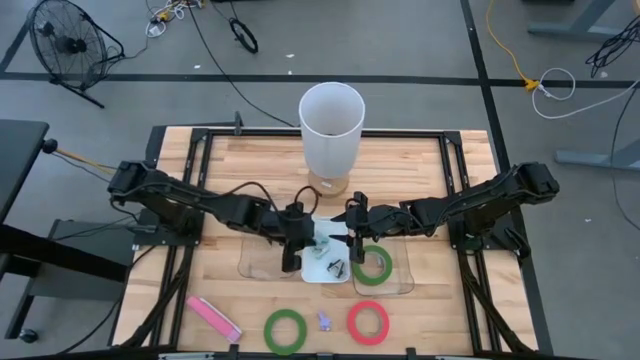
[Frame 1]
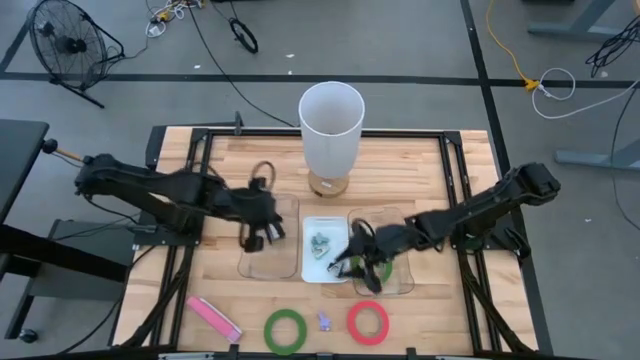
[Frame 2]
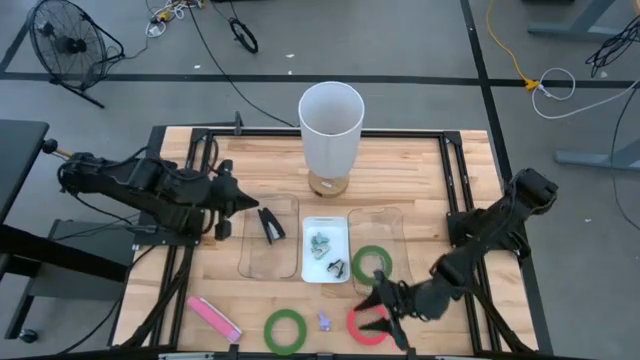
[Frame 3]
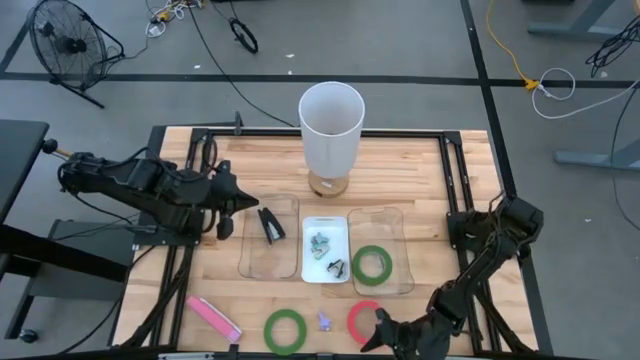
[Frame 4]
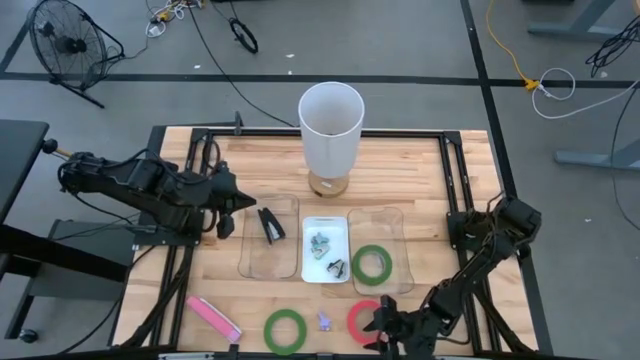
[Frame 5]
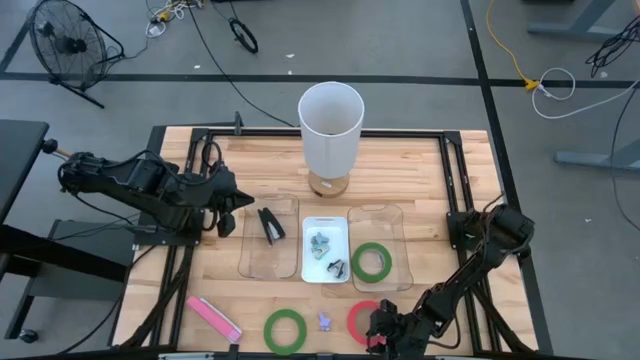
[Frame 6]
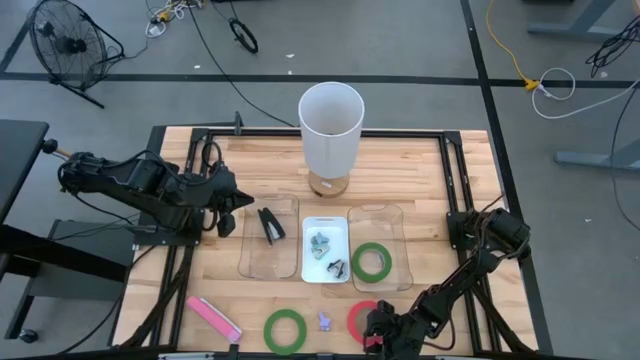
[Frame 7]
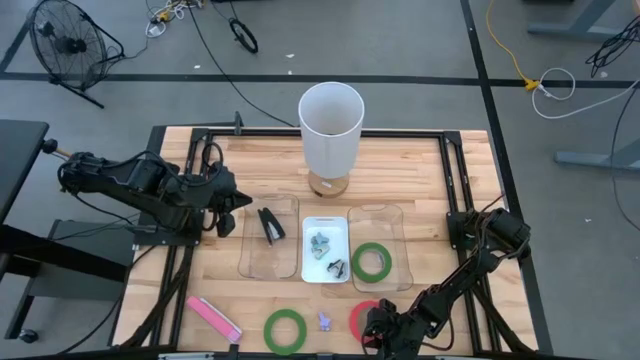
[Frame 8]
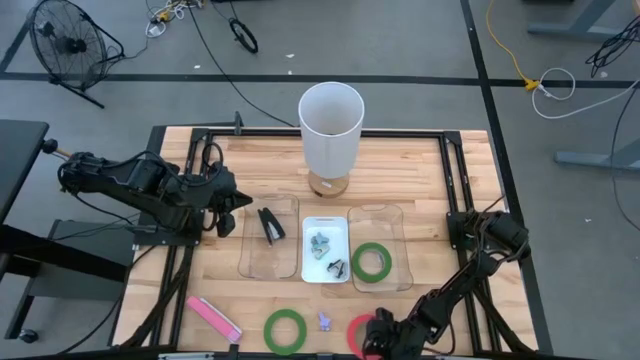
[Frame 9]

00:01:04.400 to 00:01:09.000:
Task: Pick and place Stapler, Stapler remover, tape
Put the pink tape into the right transparent bin

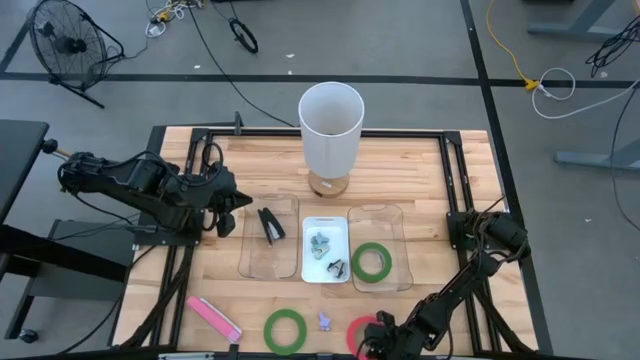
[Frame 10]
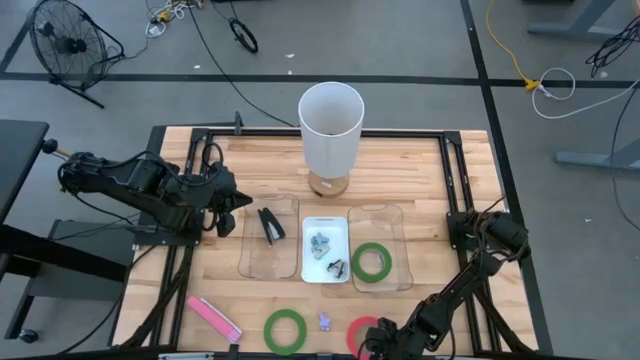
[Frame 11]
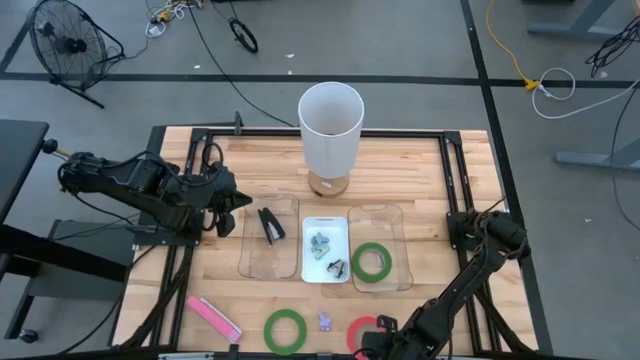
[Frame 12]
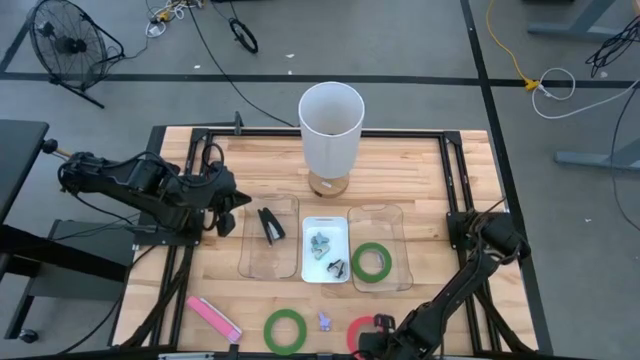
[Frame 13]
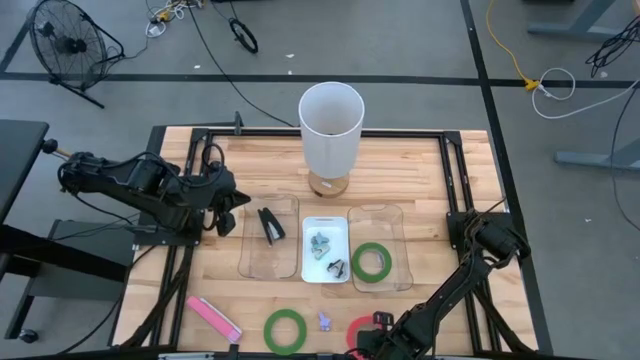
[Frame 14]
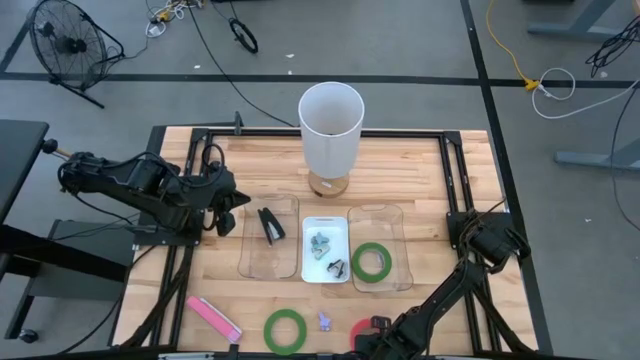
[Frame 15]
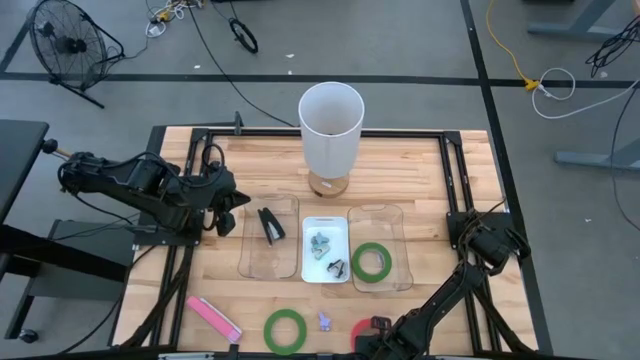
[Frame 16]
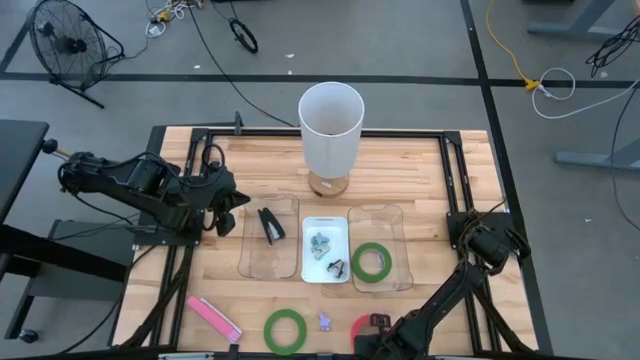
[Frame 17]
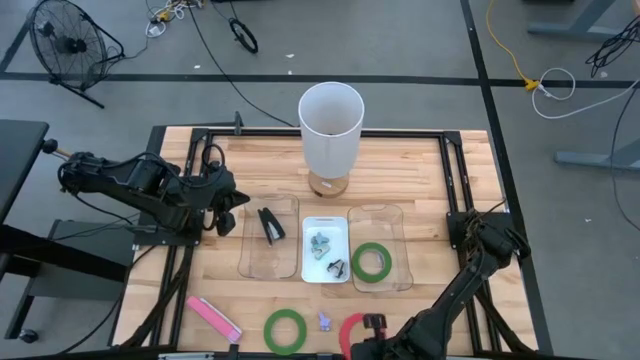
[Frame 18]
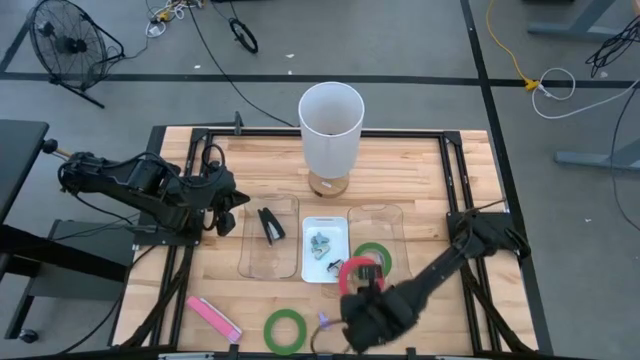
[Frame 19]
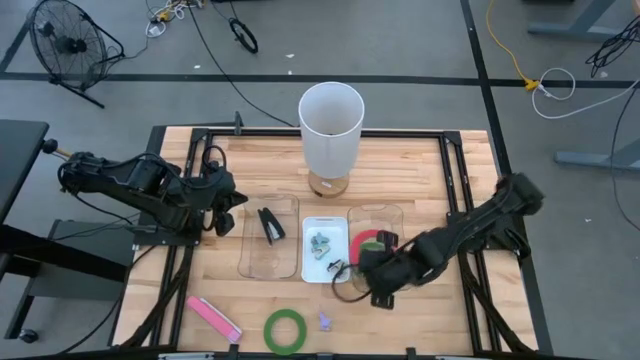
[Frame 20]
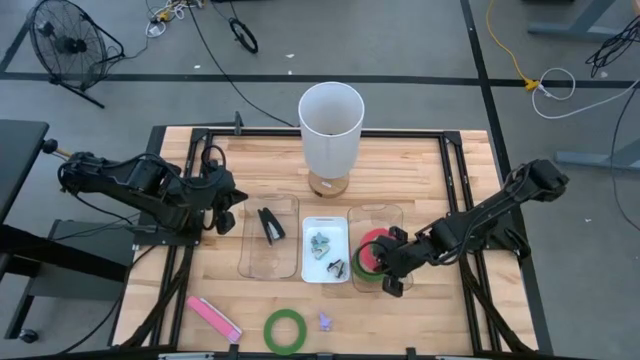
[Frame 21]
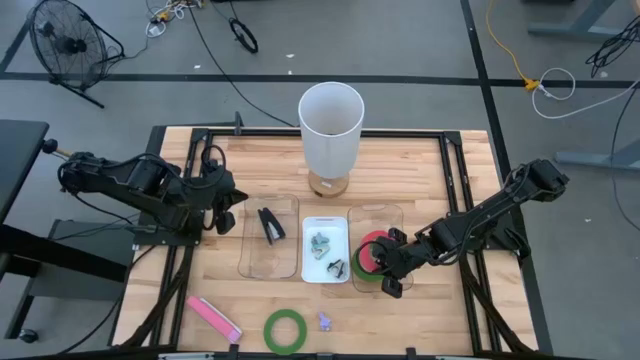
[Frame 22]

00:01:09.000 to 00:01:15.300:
Put the pink tape into the right transparent bin

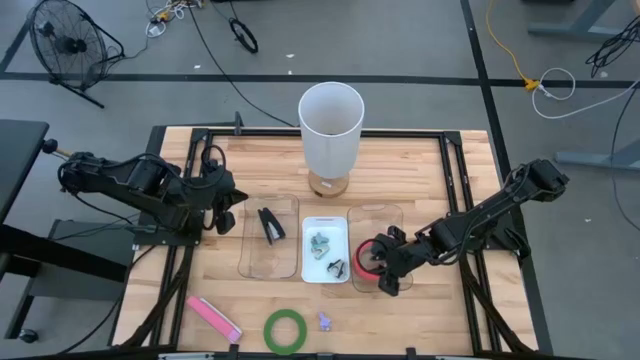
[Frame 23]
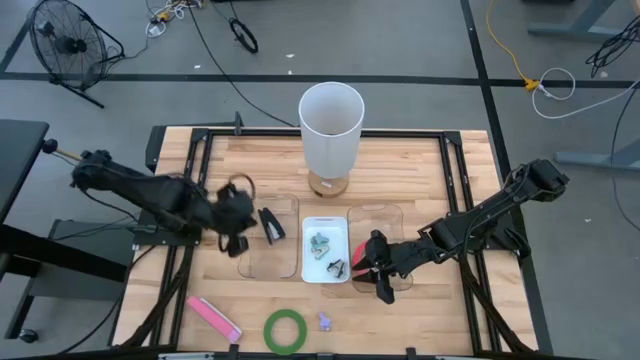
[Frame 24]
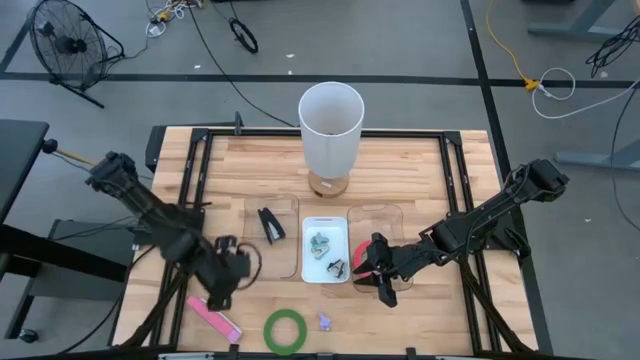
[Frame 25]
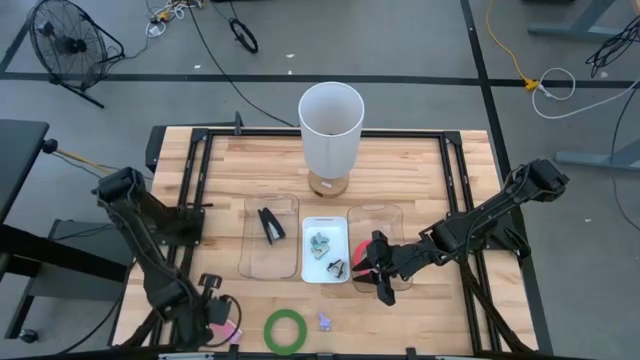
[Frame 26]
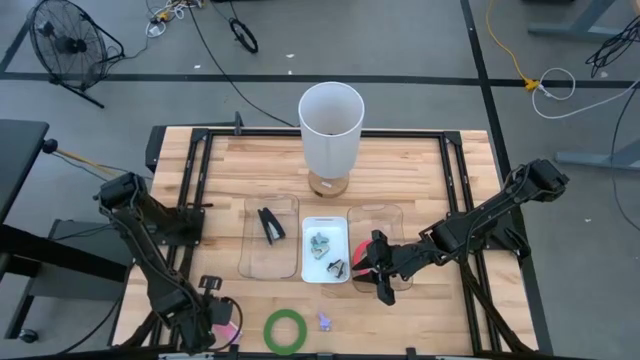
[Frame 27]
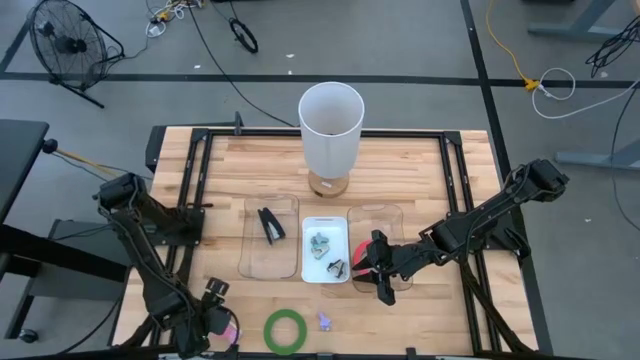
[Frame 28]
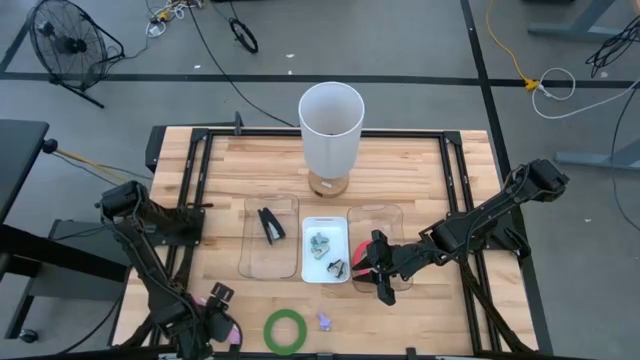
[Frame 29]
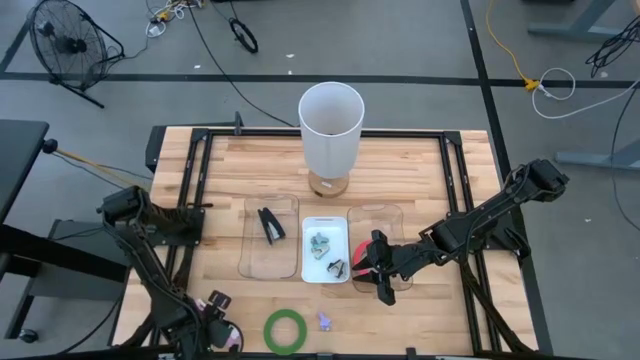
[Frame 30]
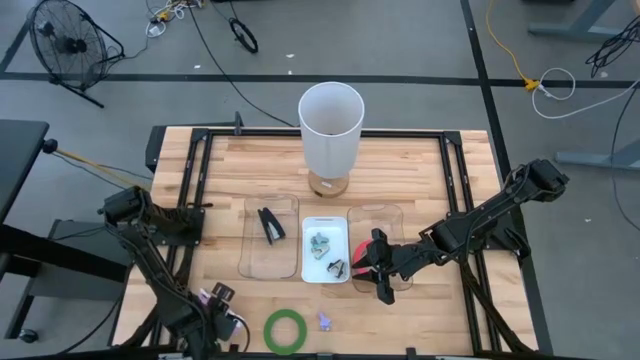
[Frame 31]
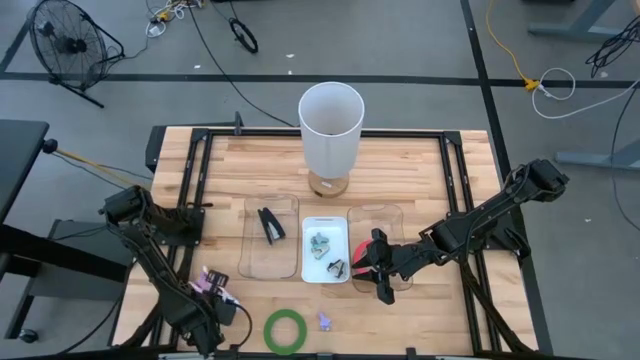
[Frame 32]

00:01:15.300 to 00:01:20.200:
Put the pink stapler into the left transparent bin

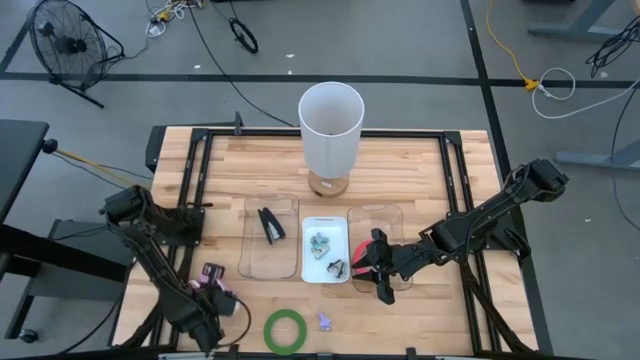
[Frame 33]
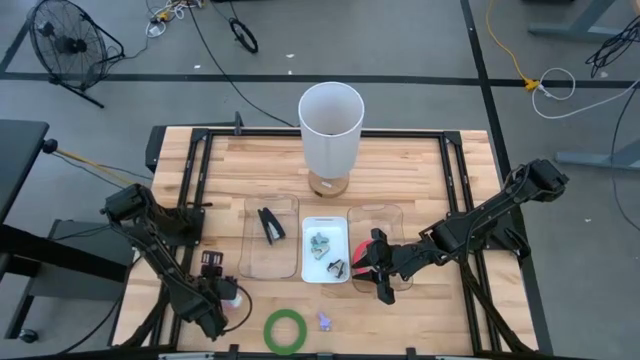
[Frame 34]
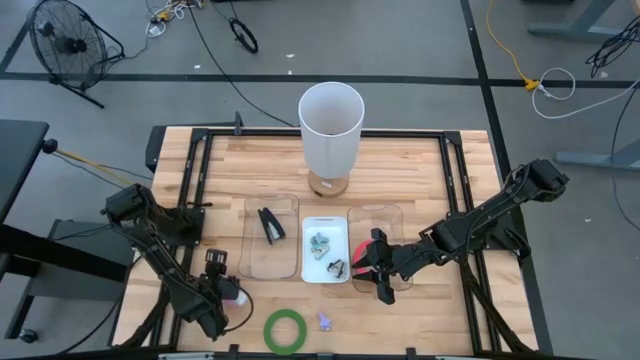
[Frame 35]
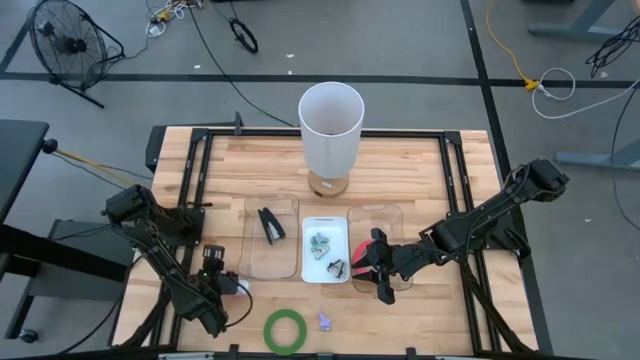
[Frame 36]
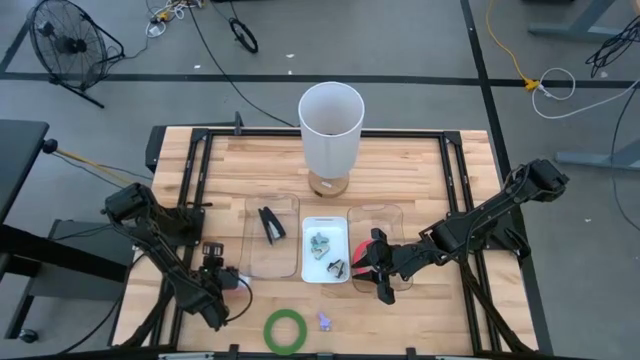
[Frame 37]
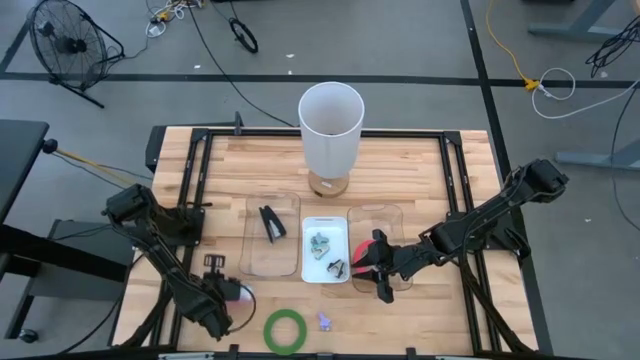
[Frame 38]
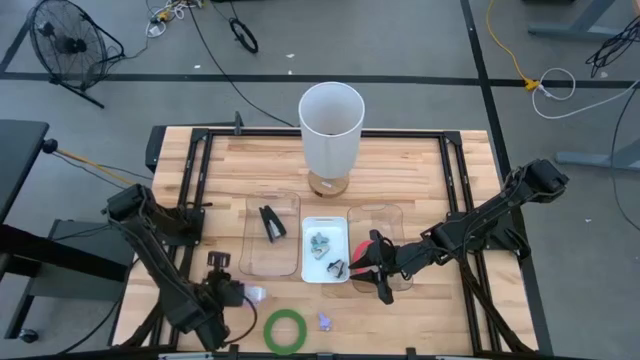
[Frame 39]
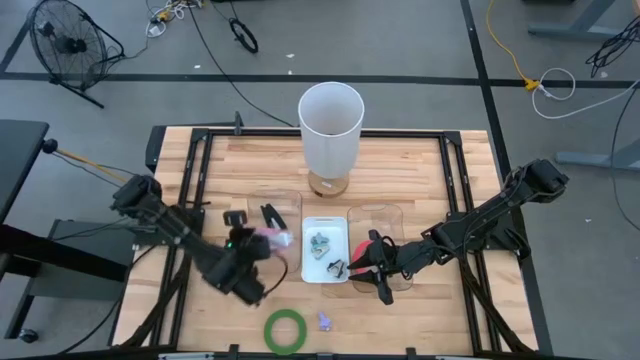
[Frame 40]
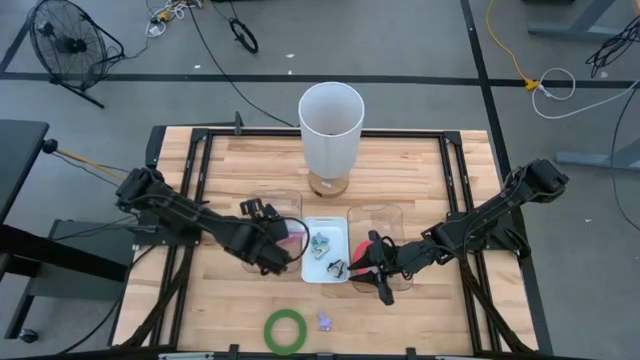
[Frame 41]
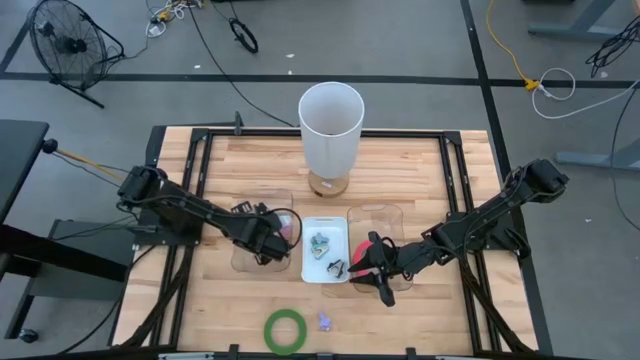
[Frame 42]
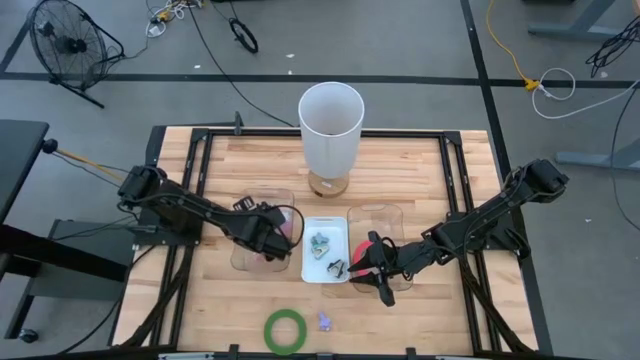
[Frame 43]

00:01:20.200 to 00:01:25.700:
Put the pink stapler into the left transparent bin

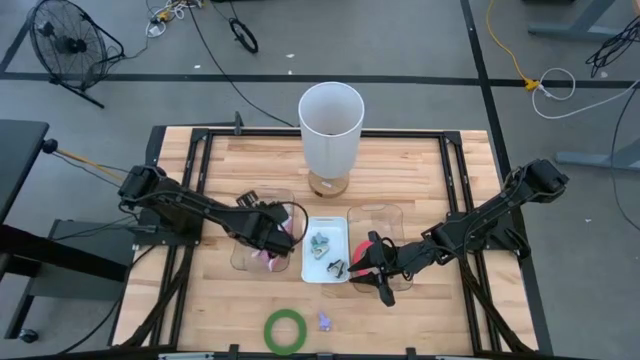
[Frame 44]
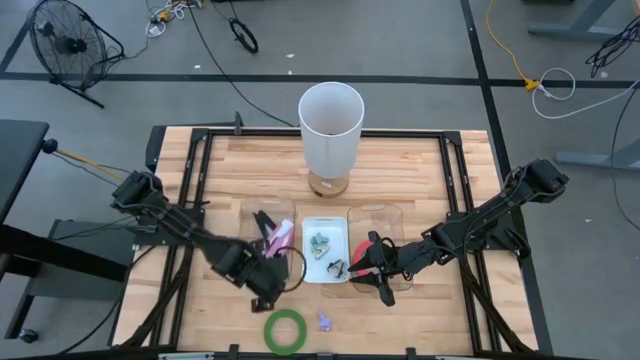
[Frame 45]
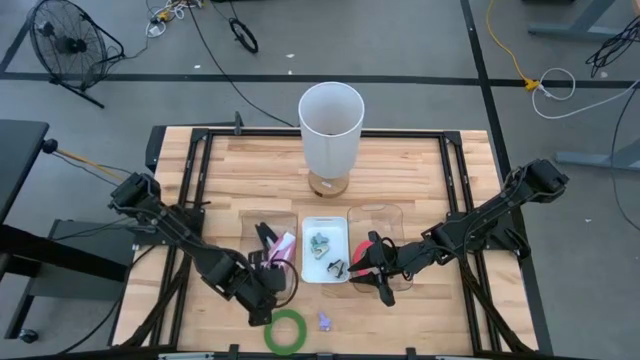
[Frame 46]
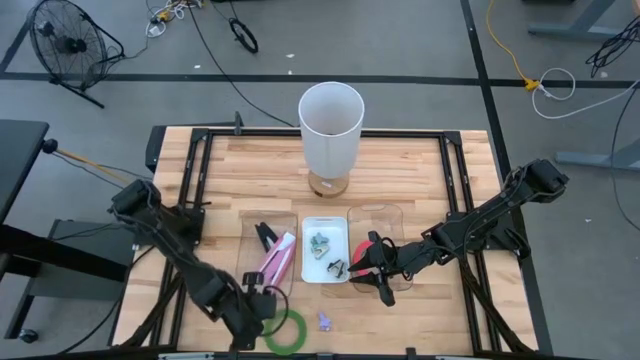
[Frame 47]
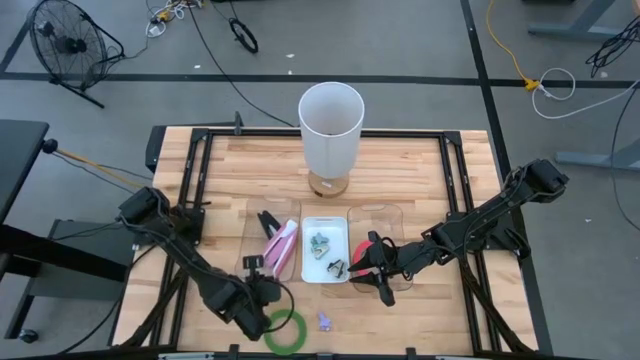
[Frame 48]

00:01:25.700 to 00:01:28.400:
Adjust the left transparent bin
